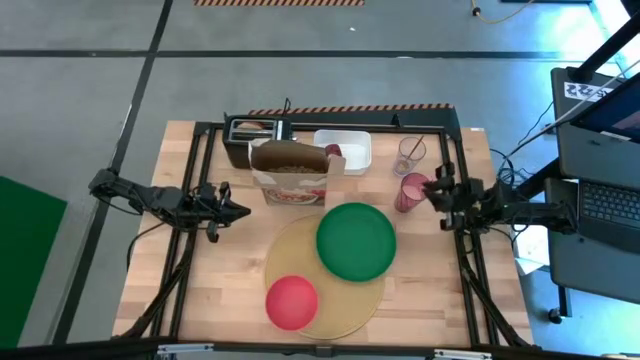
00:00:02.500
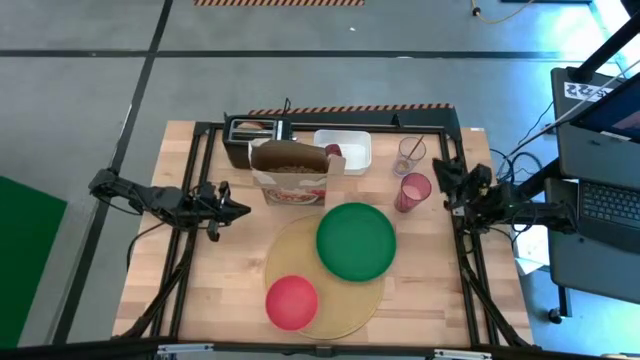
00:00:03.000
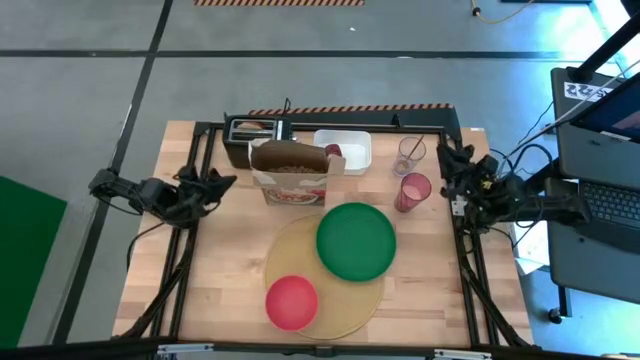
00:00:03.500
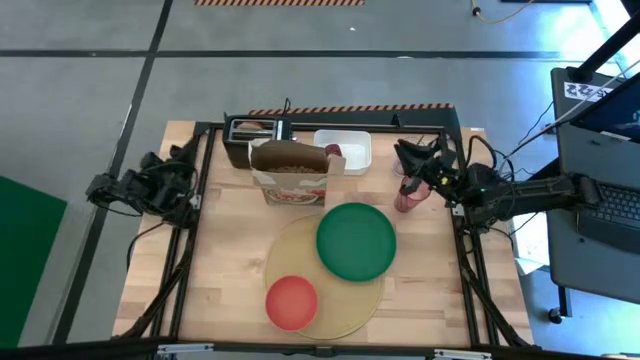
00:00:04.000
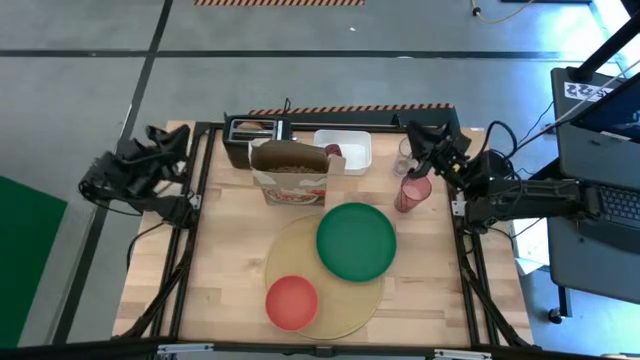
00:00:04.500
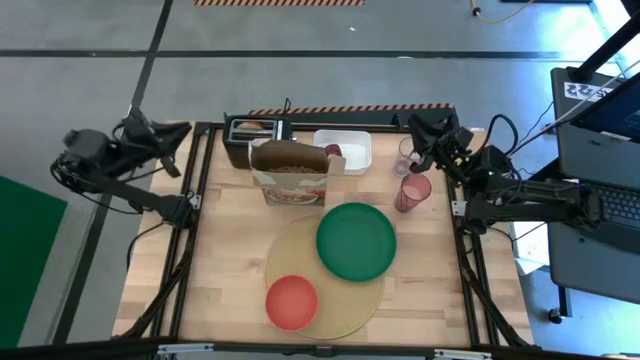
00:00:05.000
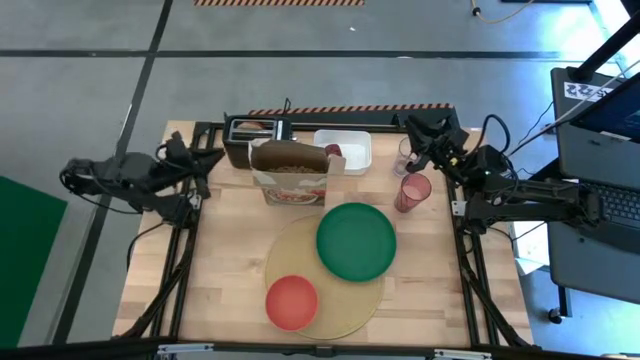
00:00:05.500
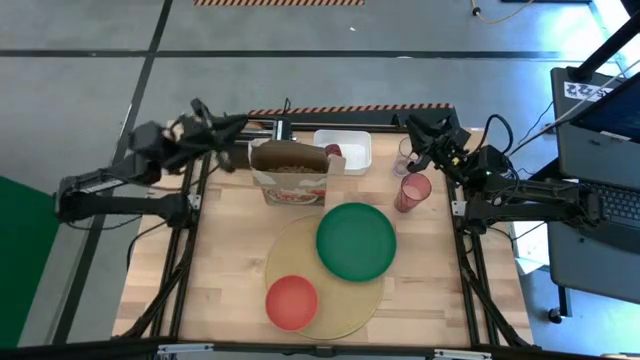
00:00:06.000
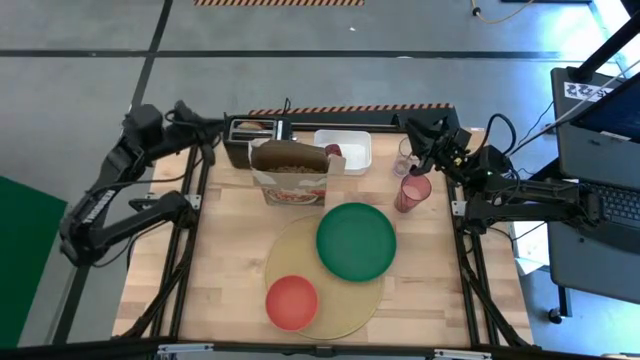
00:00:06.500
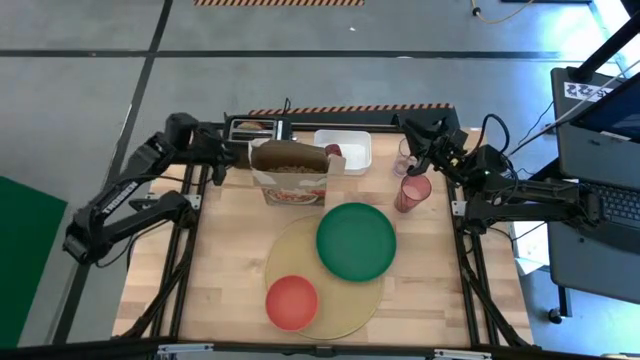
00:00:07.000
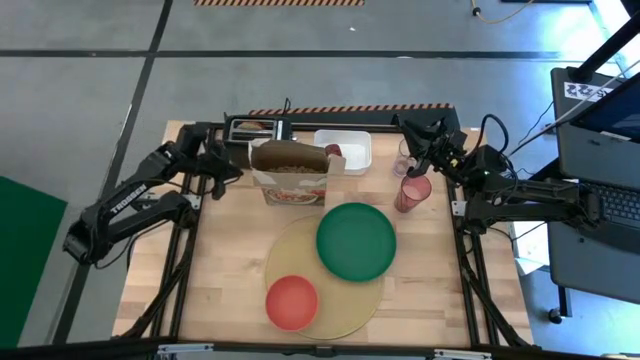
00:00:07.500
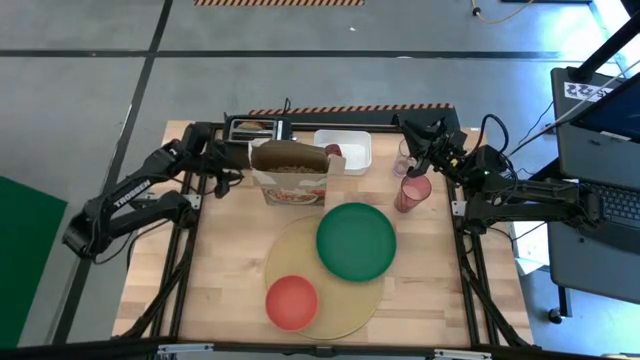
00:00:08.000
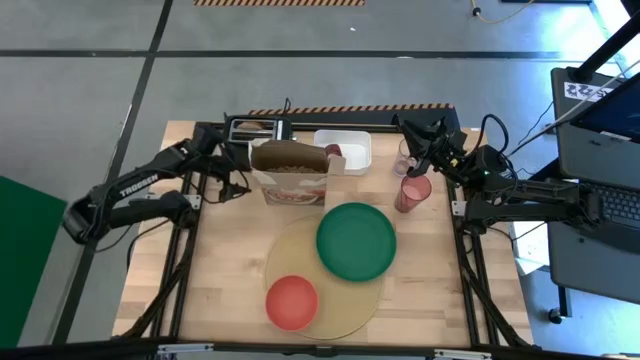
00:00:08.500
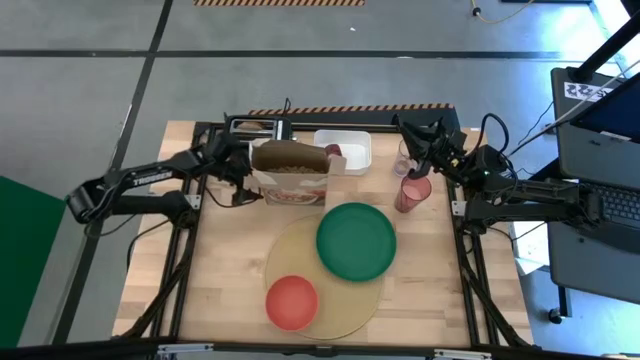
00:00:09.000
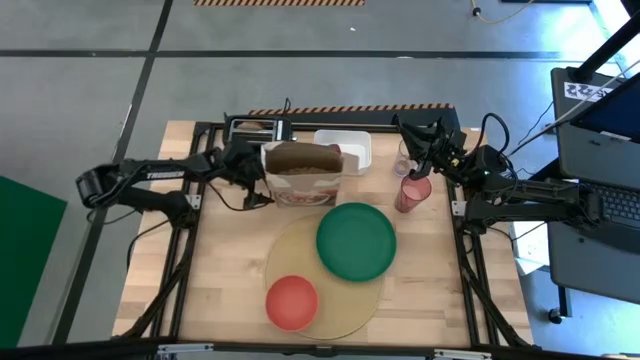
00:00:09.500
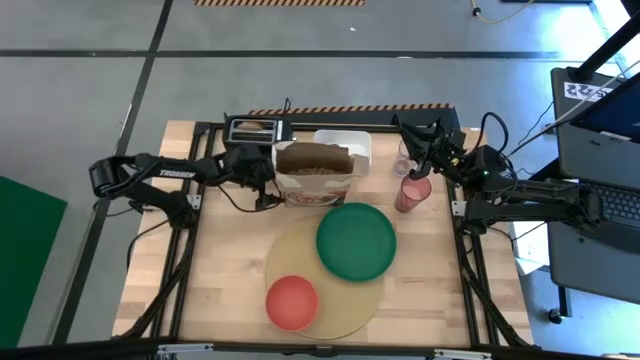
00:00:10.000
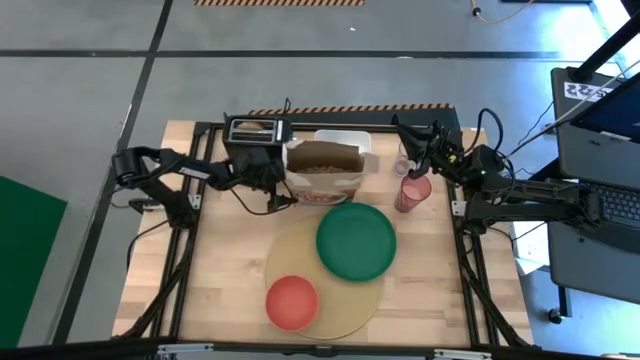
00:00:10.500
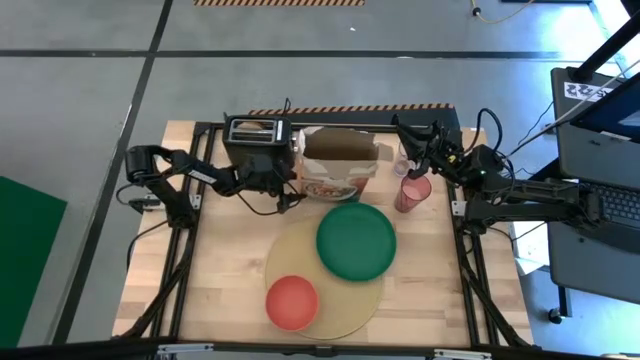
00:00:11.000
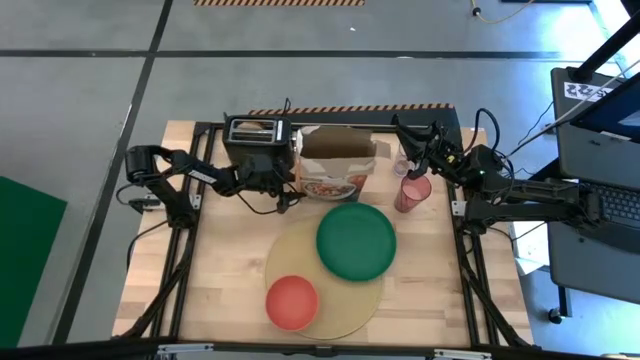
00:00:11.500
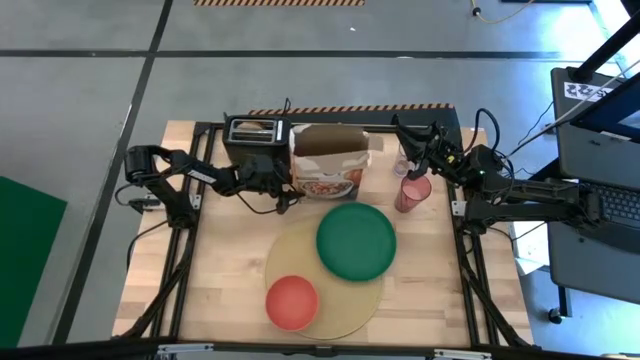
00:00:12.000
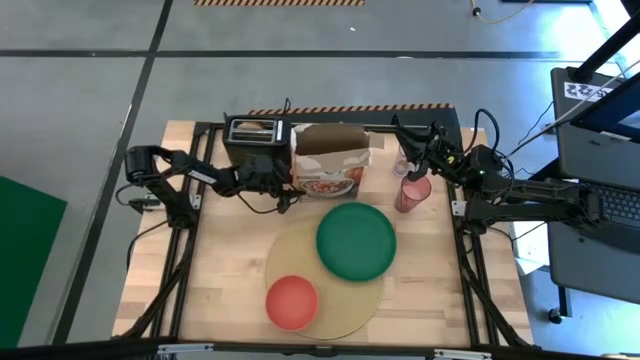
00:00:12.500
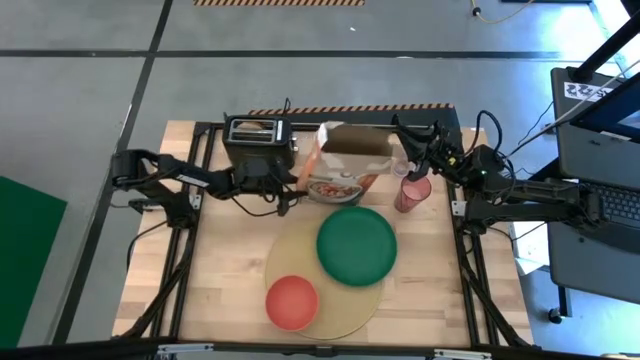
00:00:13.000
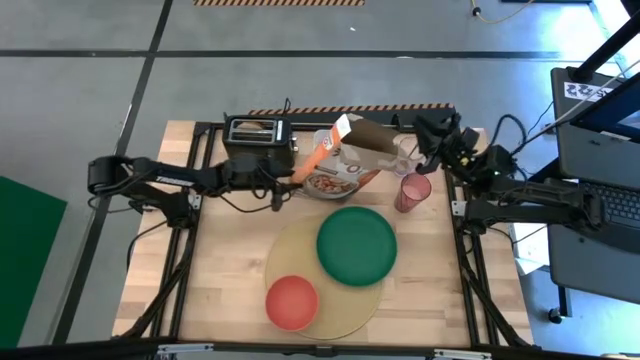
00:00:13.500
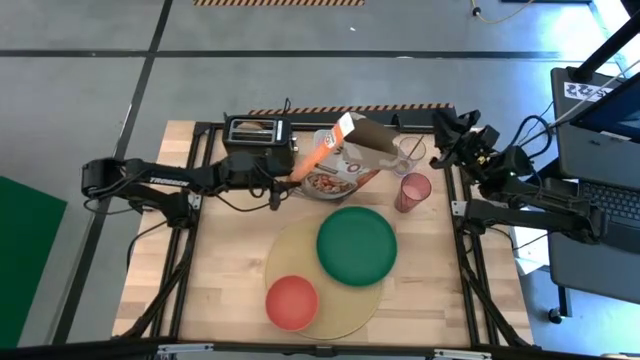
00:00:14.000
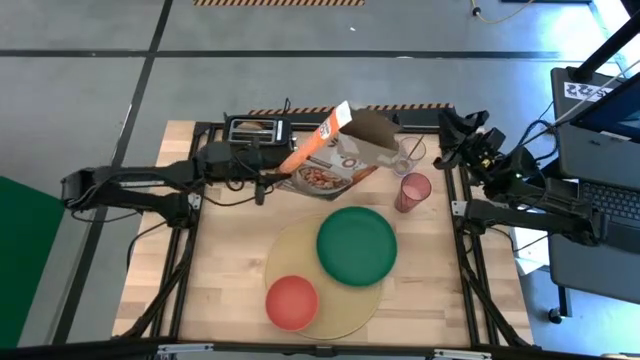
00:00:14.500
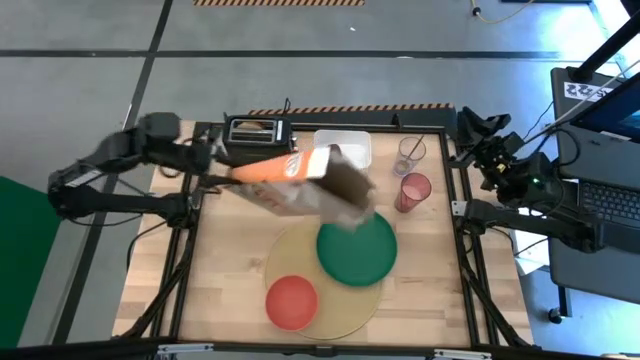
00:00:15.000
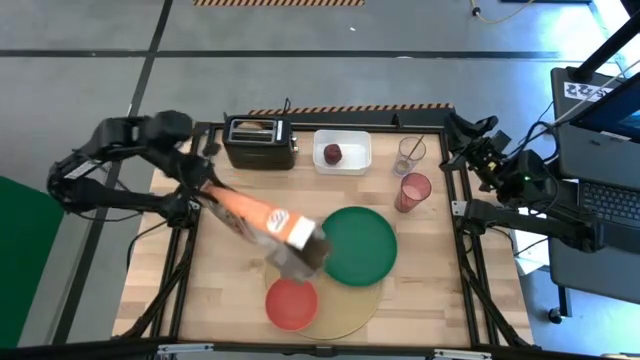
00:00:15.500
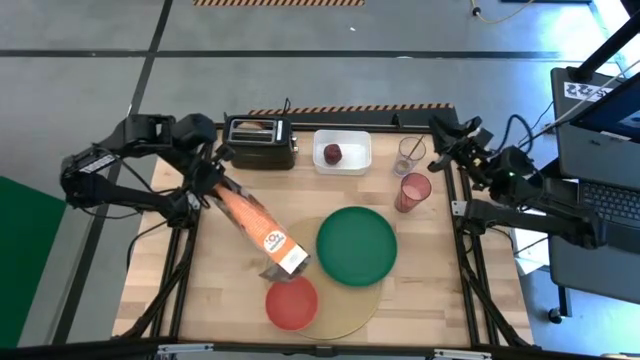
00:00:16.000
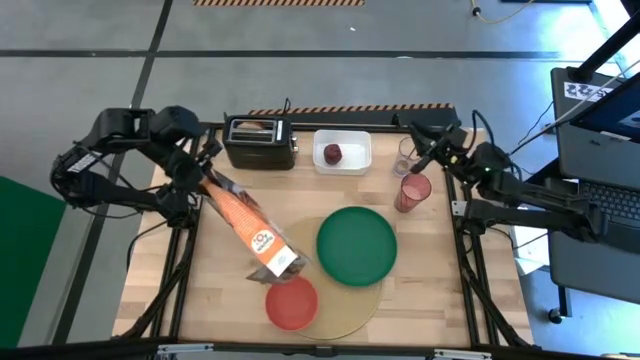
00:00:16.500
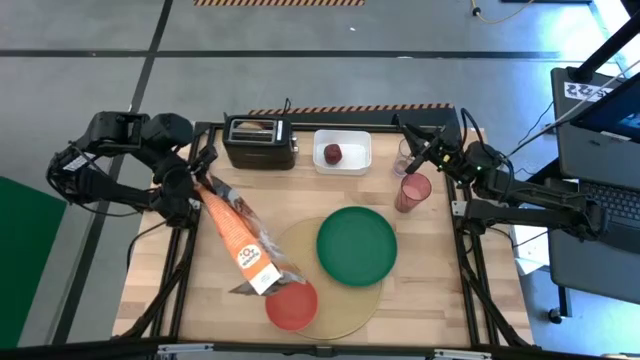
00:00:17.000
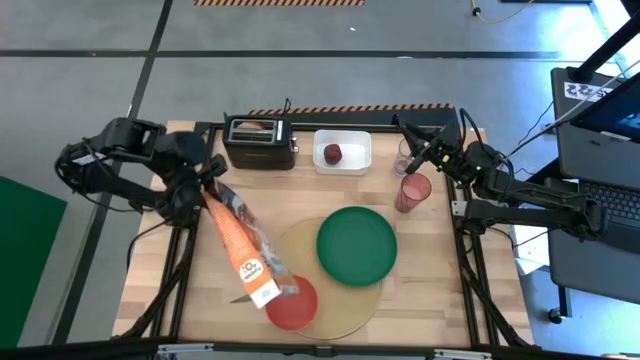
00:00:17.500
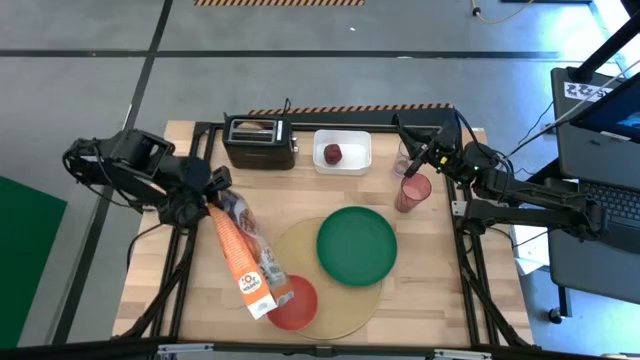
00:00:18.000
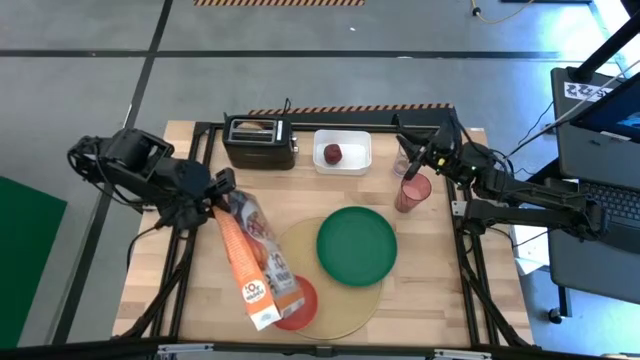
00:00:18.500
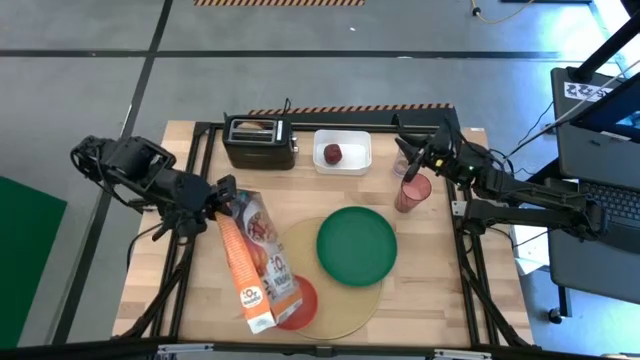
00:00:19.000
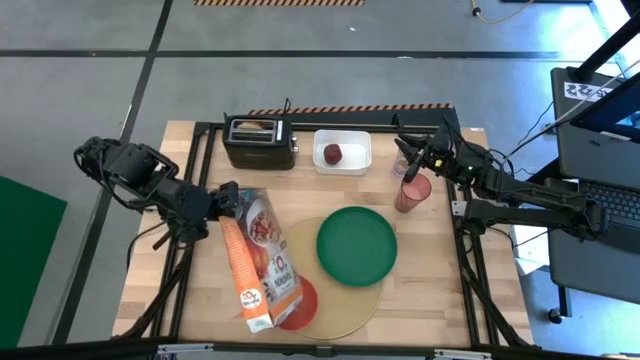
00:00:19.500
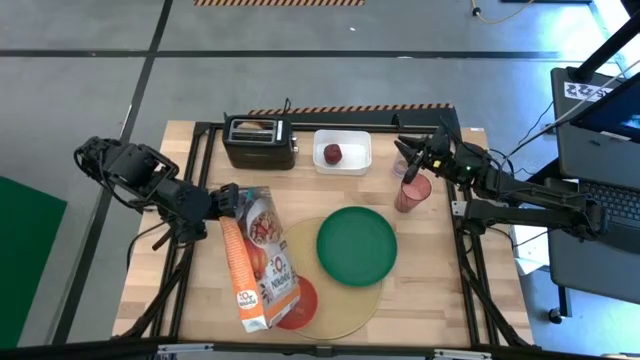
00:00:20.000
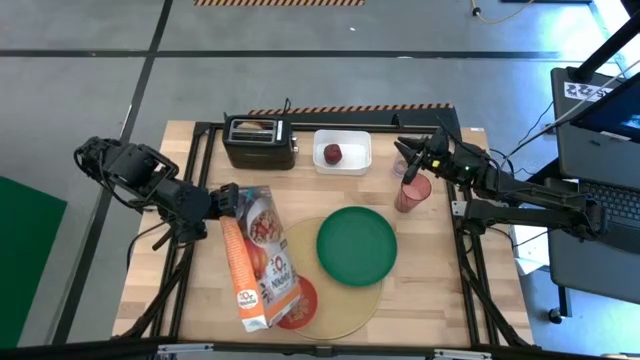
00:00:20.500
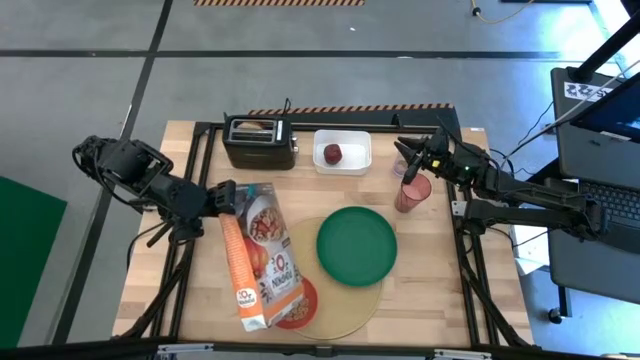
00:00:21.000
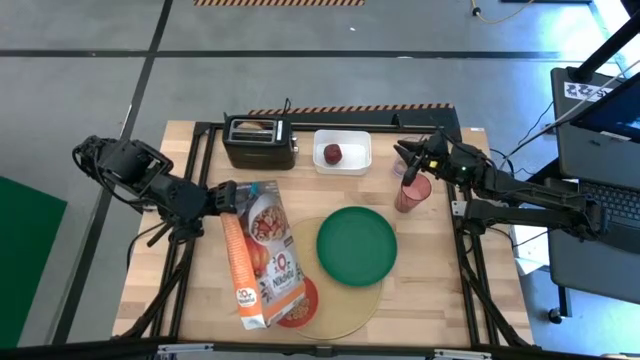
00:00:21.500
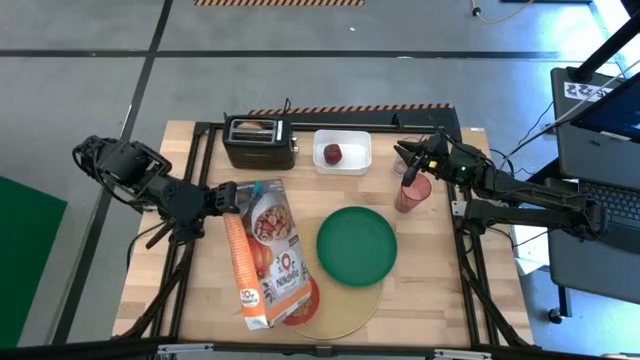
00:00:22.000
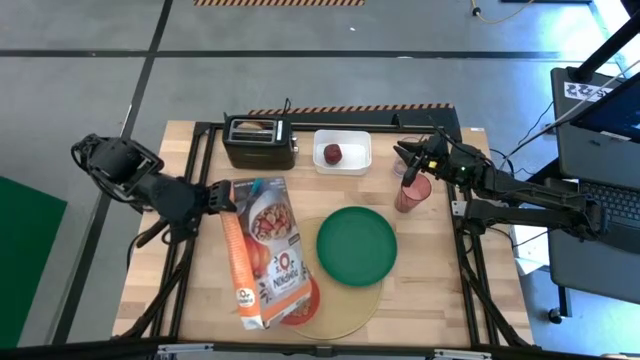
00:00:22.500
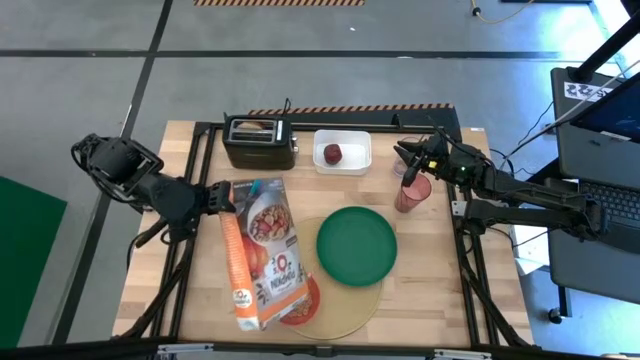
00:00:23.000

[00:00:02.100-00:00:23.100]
Task: Arrange a breakfast setting
Pour the cereal from the cereal box into the orange bowl
